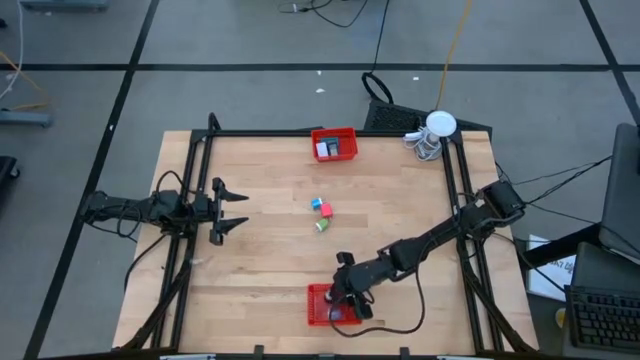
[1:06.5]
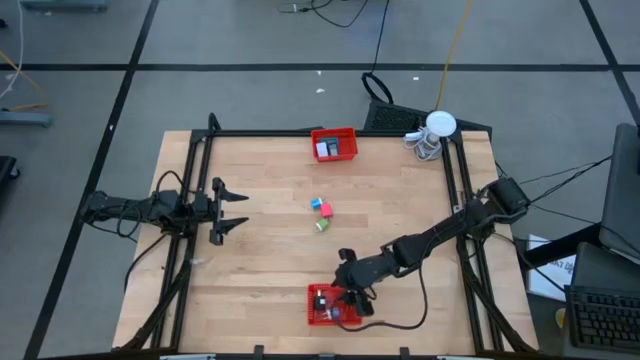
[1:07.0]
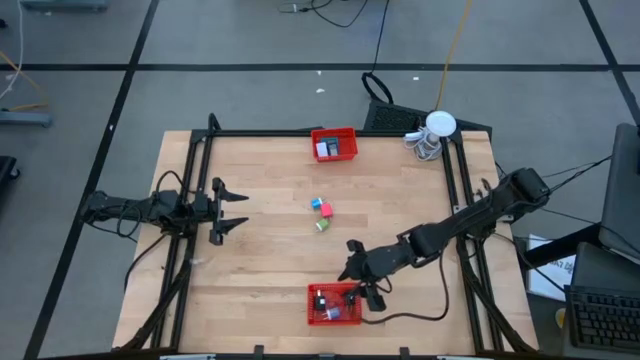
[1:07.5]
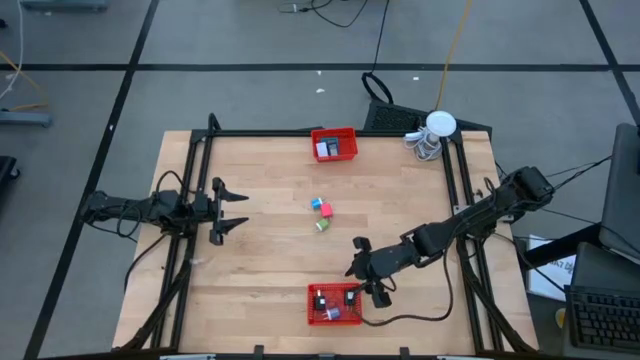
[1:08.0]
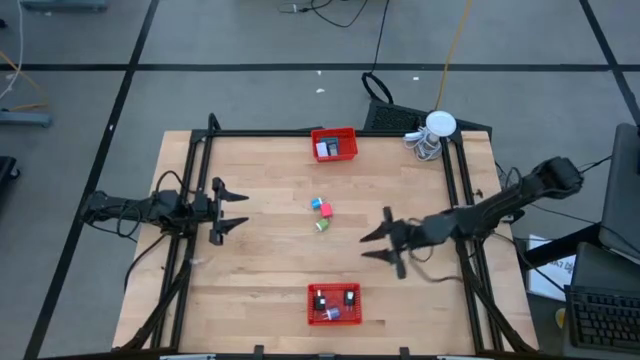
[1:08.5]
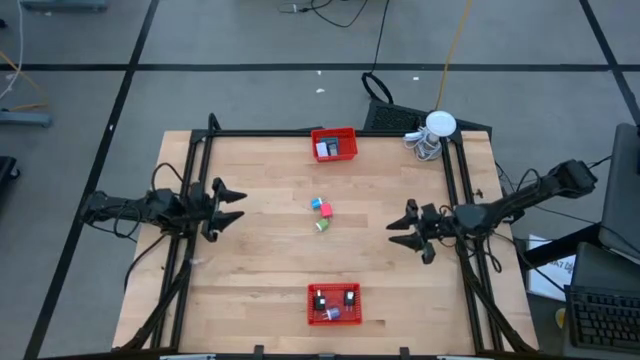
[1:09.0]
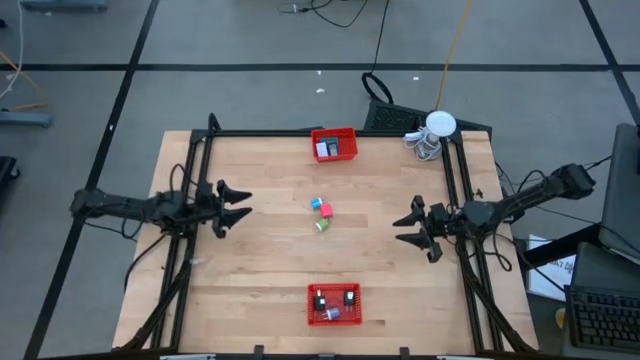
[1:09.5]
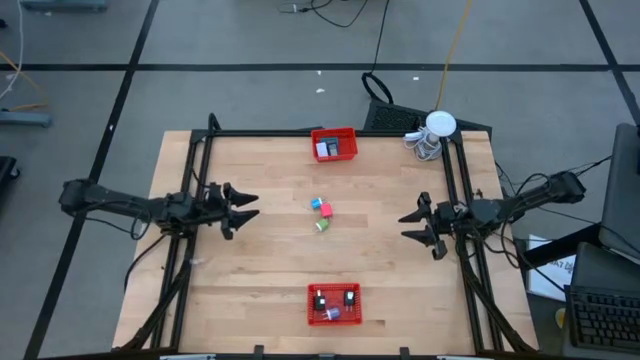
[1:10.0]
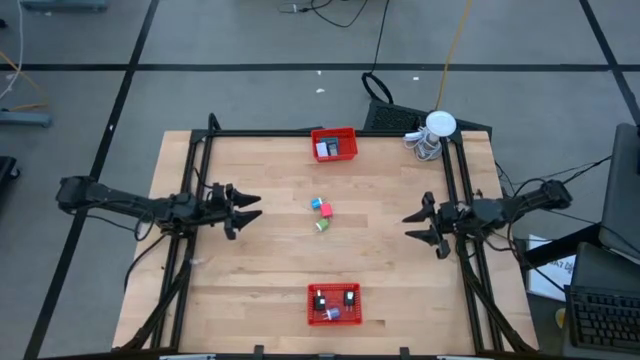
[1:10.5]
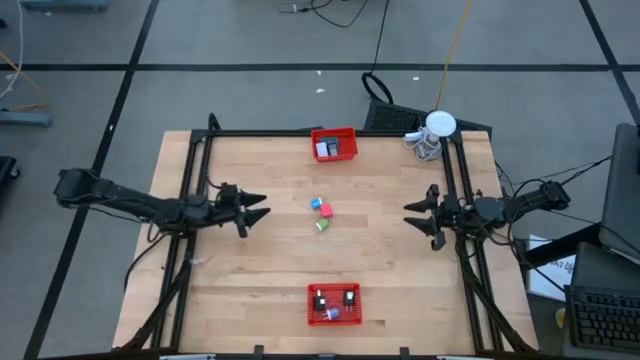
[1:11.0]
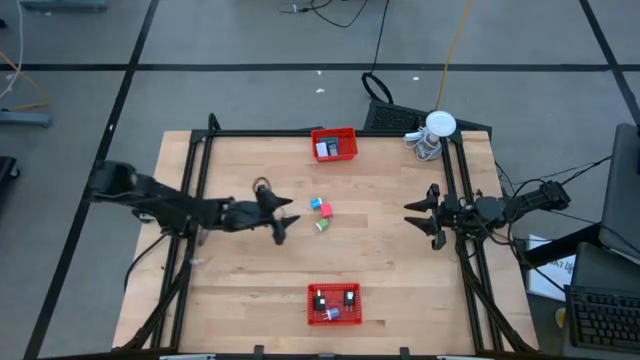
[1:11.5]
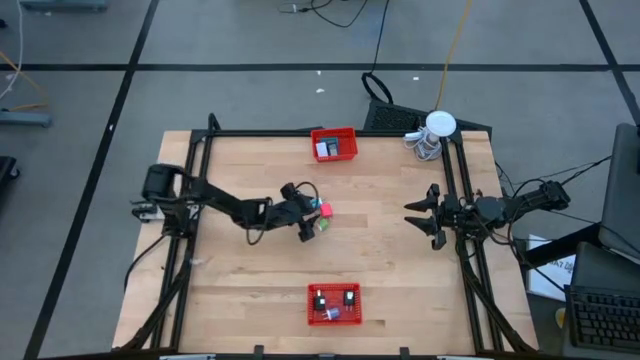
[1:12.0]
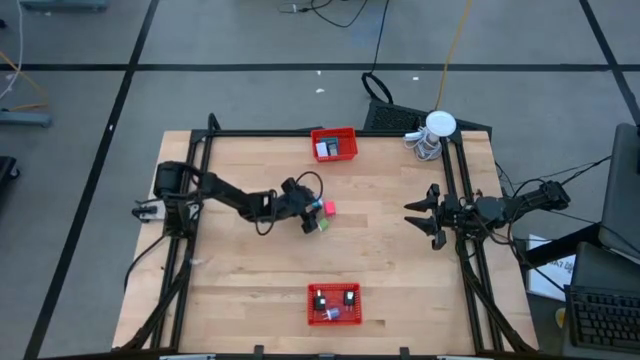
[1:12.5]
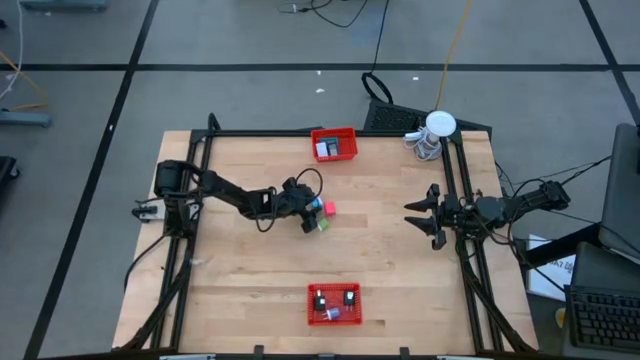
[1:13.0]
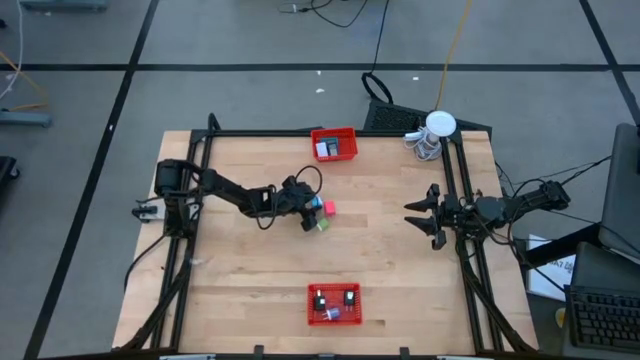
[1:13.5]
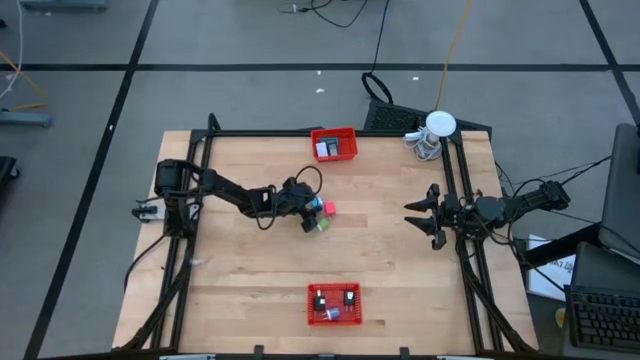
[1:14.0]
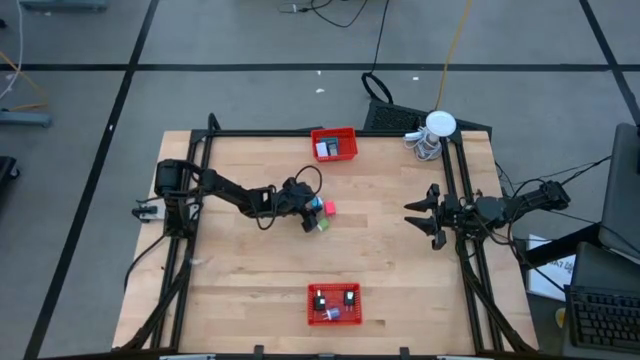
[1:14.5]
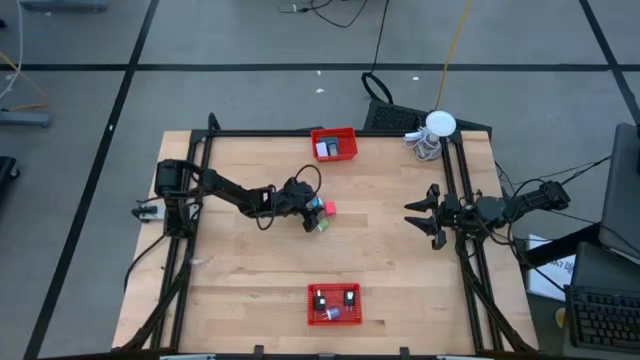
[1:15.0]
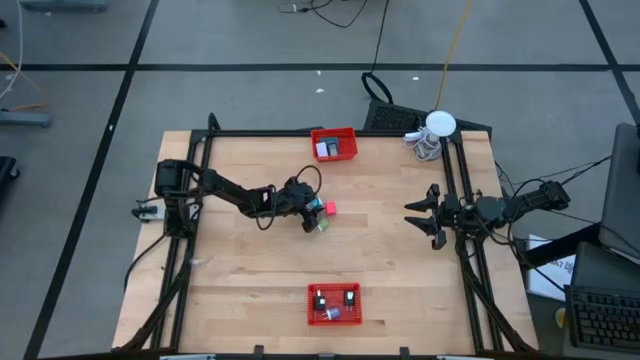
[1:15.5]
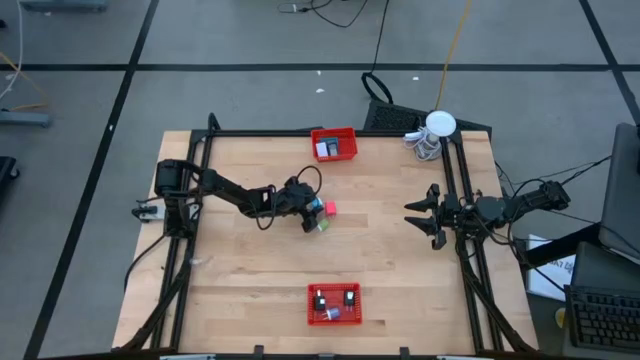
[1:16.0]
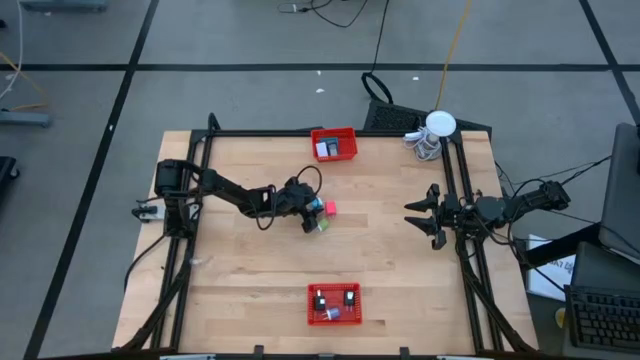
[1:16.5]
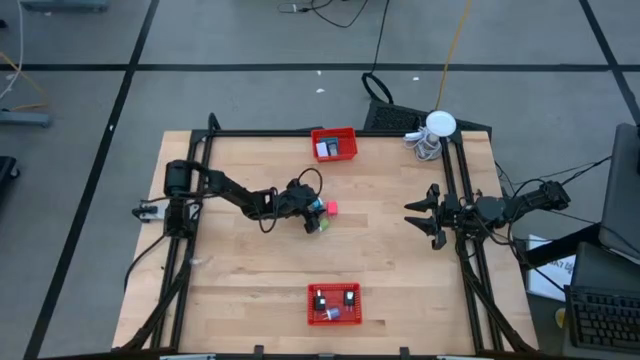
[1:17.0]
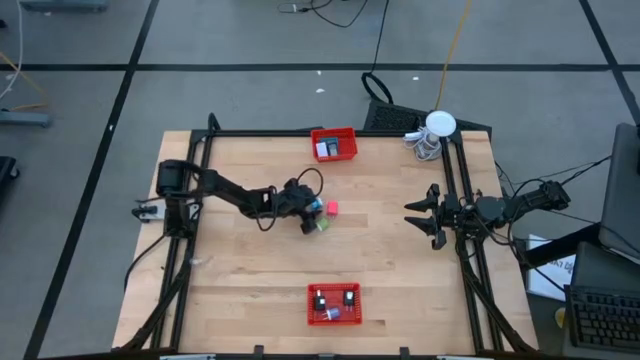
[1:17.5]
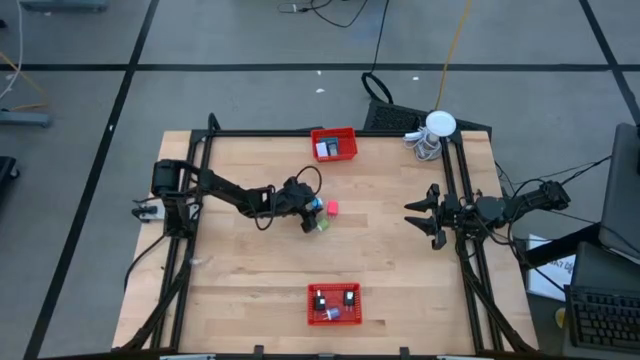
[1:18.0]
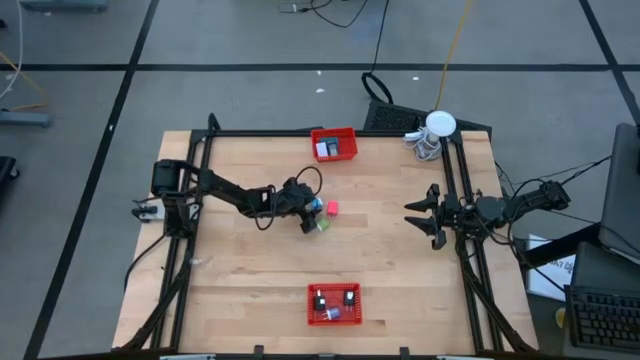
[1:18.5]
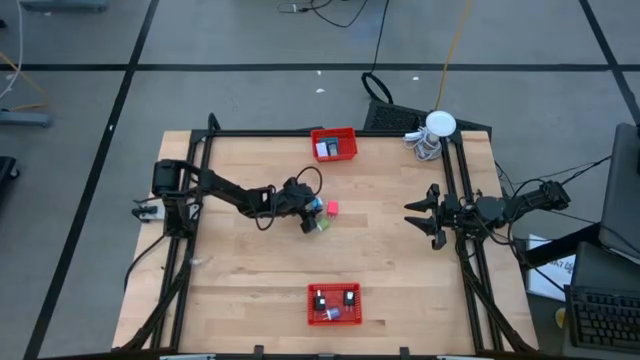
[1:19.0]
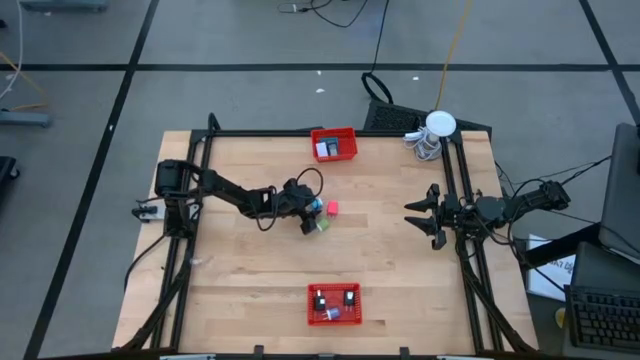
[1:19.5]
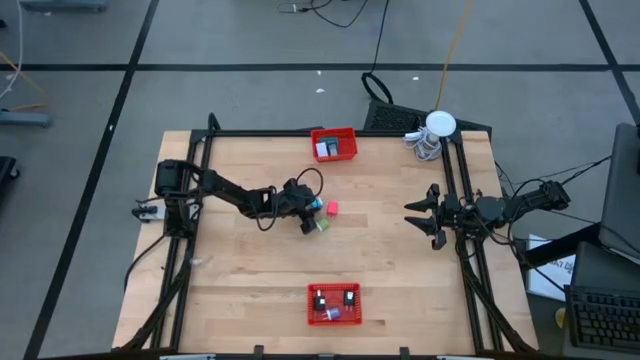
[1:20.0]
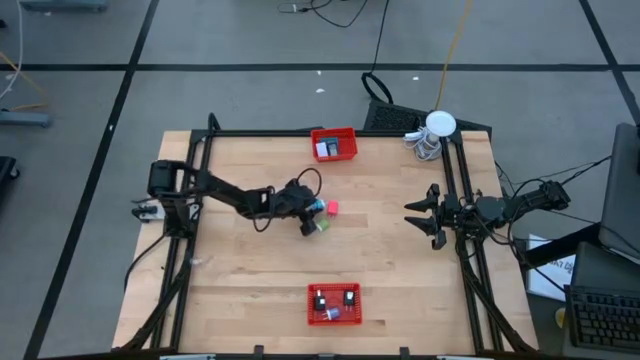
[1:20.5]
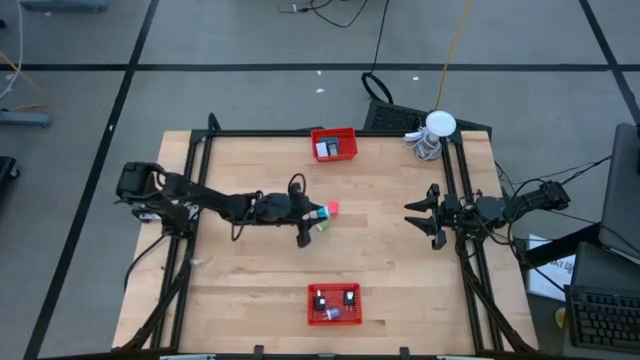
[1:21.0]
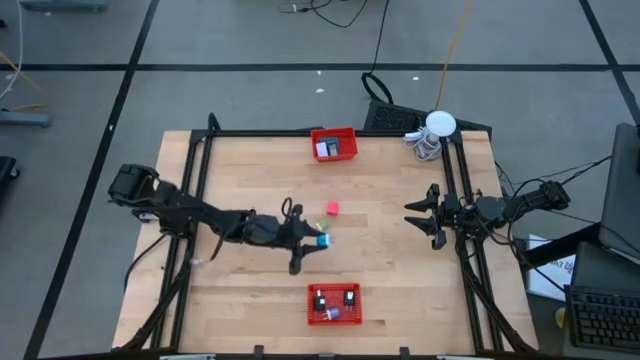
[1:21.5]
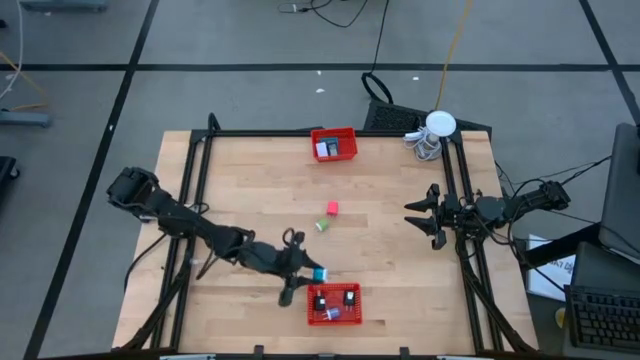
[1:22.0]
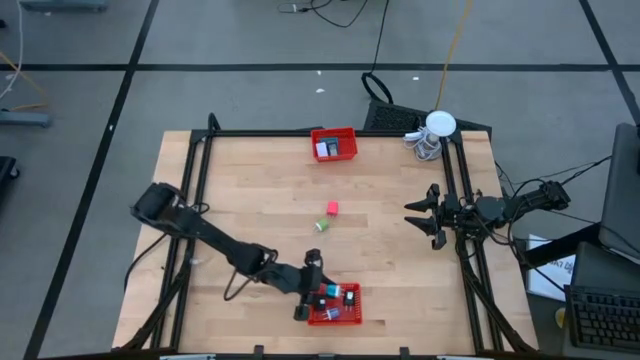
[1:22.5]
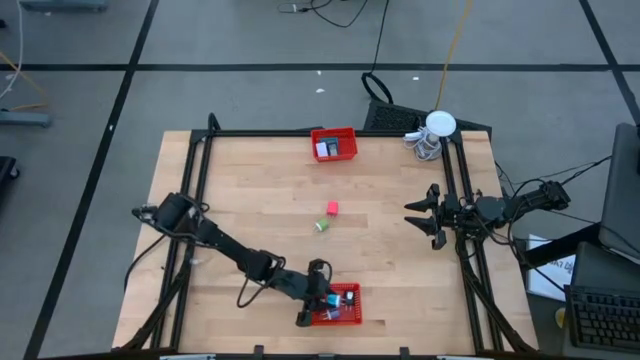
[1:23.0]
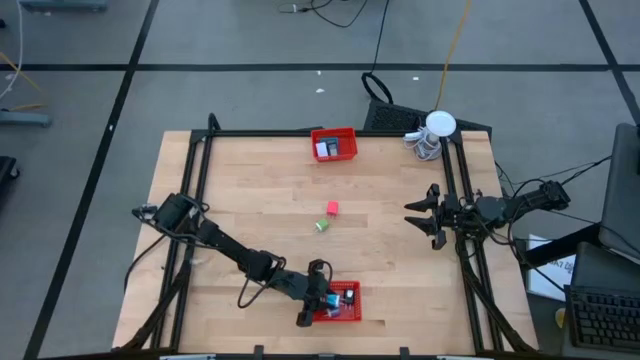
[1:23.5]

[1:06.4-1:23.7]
Task: Pick & Place Office items
Put the blue charger adapter into the bottom orange bin

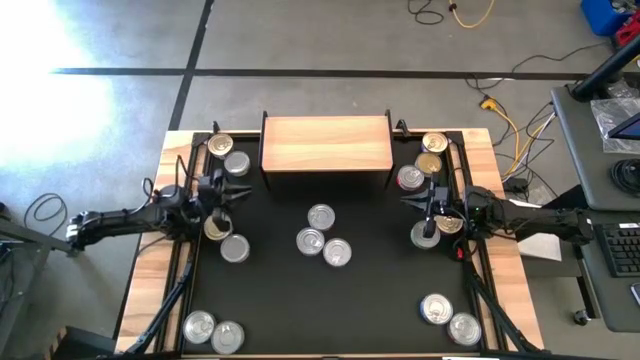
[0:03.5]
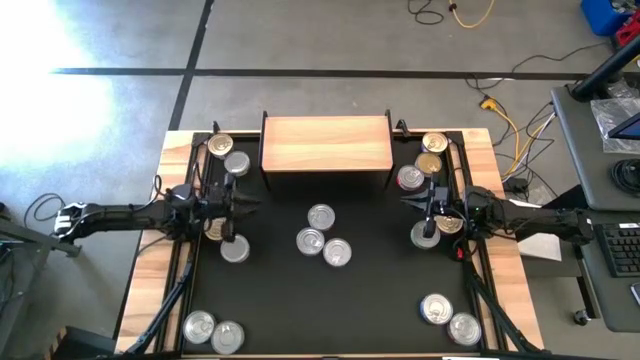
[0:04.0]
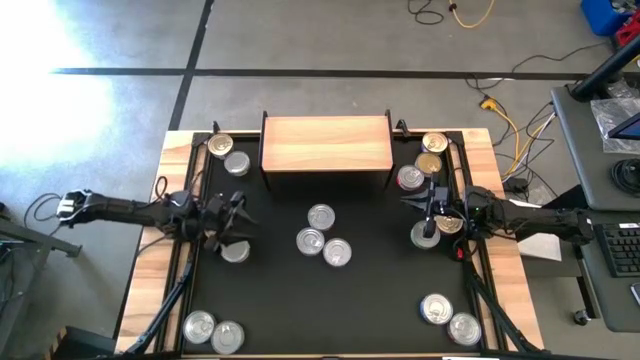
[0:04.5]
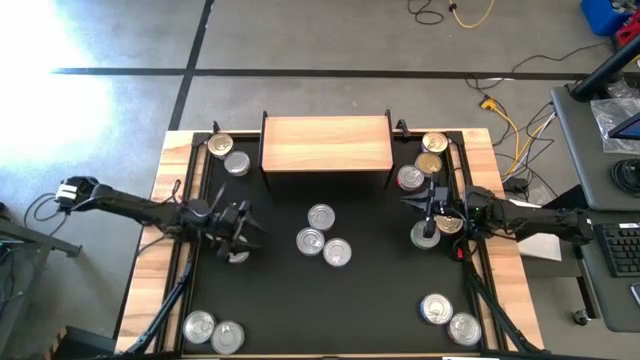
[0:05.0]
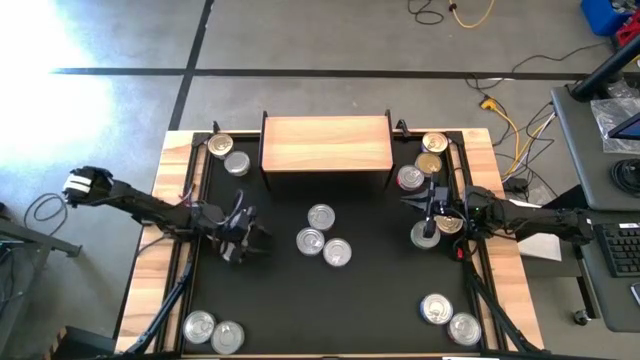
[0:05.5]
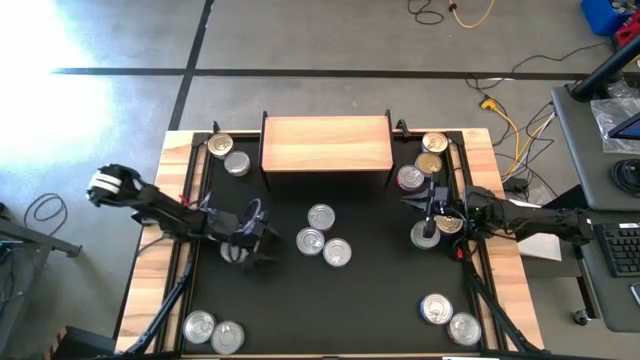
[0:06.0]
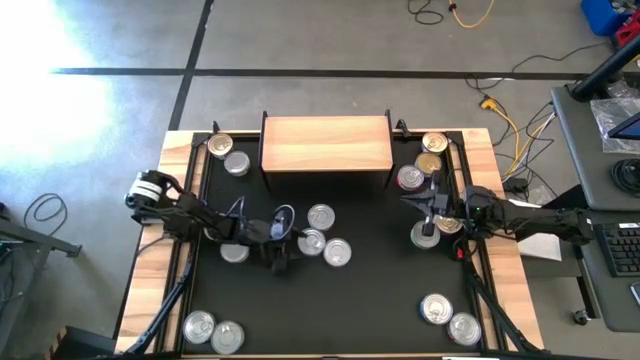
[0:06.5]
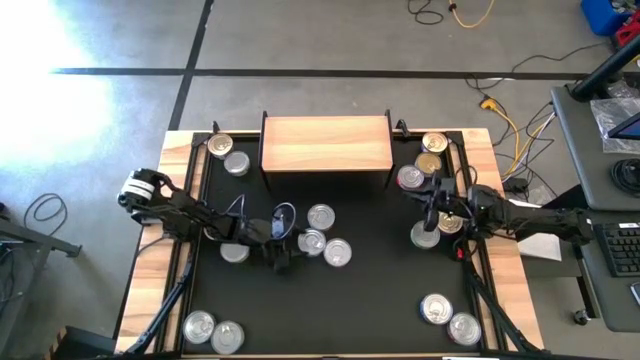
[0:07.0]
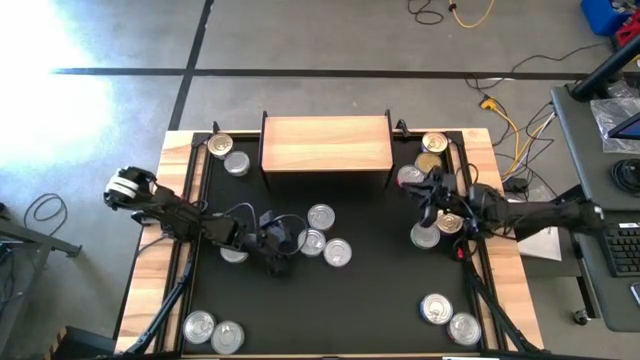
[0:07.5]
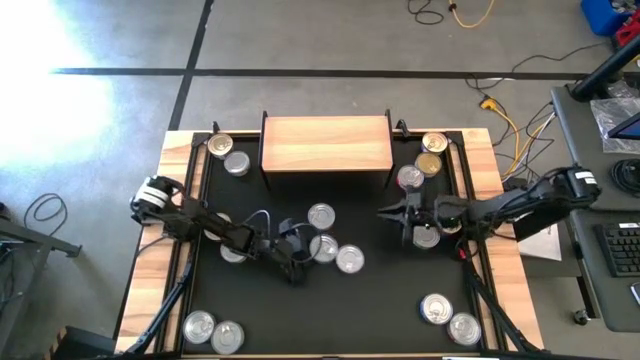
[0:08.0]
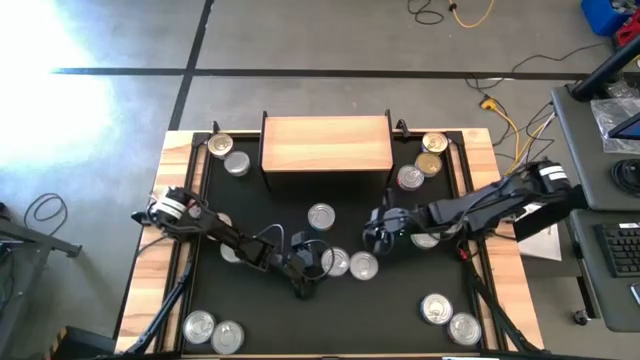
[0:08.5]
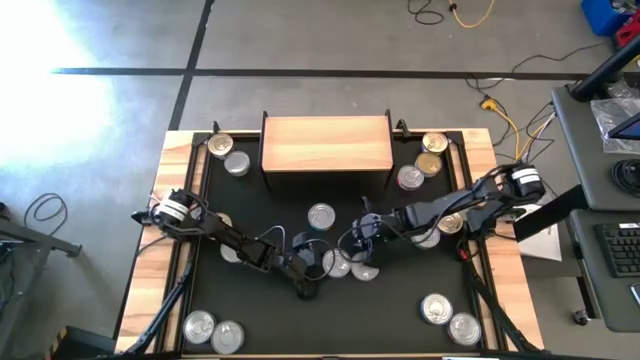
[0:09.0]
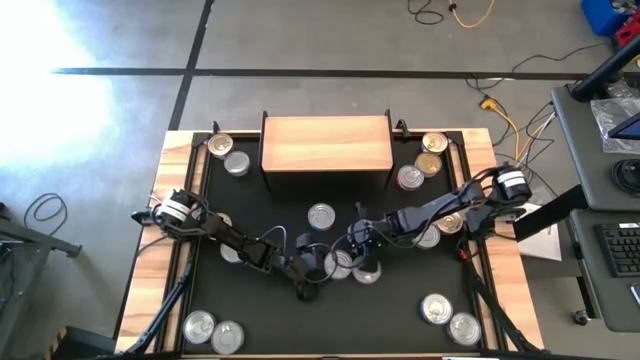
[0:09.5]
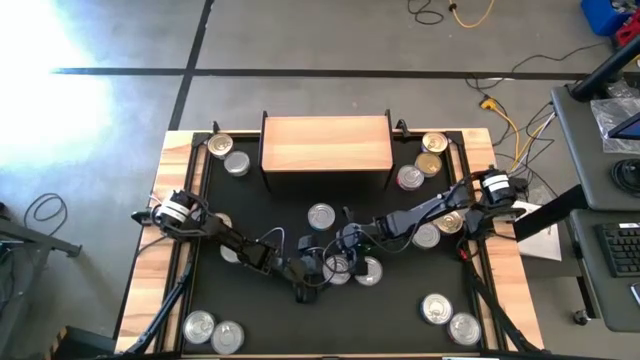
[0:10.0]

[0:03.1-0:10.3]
Task: Stack canned seafood by type on shelf
Put the top light blue tuna can on the shelf
